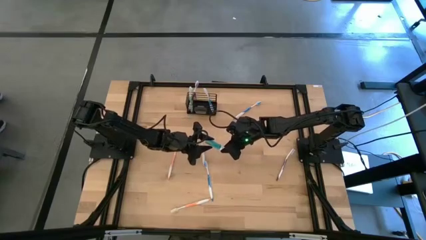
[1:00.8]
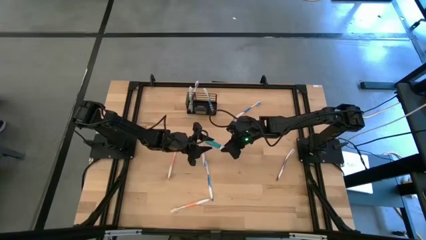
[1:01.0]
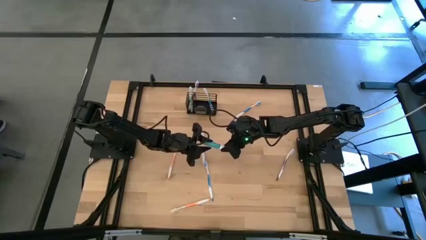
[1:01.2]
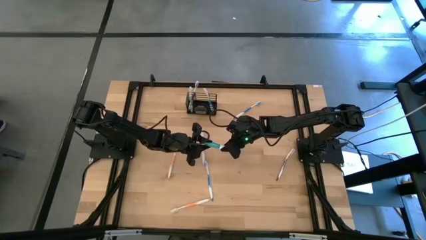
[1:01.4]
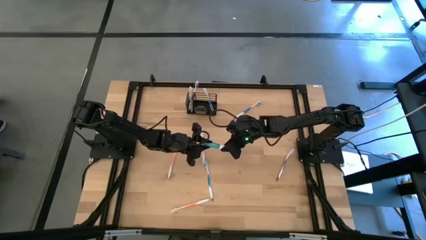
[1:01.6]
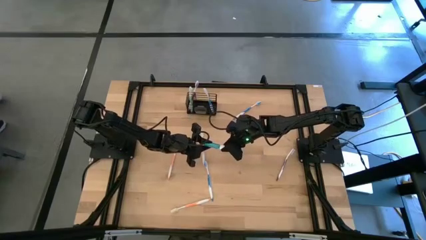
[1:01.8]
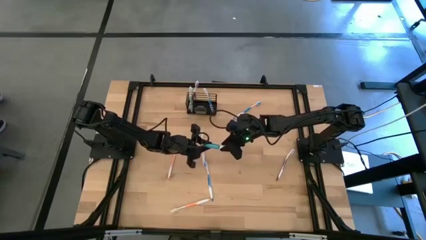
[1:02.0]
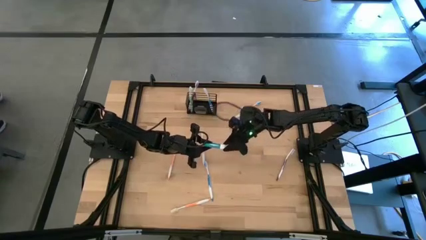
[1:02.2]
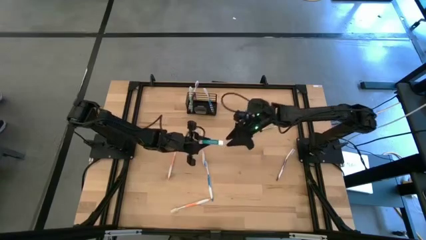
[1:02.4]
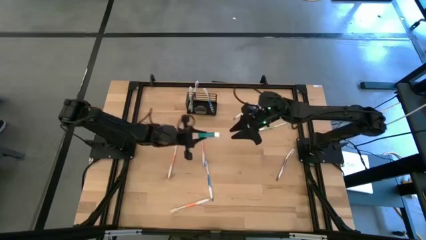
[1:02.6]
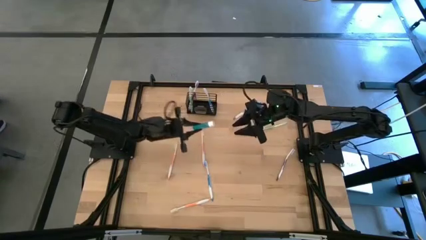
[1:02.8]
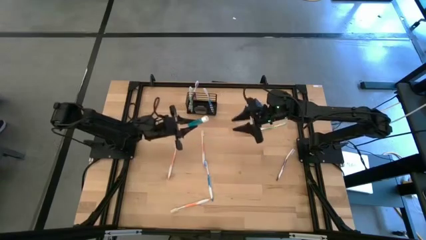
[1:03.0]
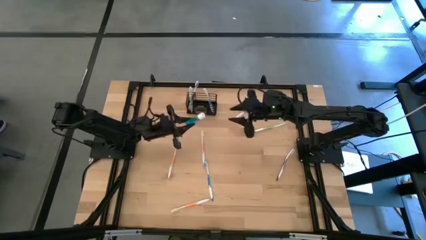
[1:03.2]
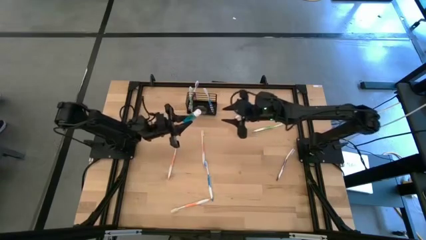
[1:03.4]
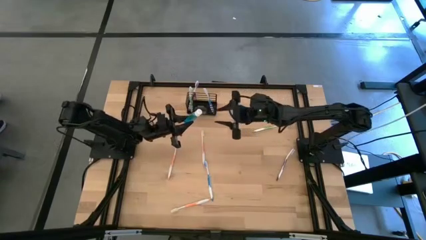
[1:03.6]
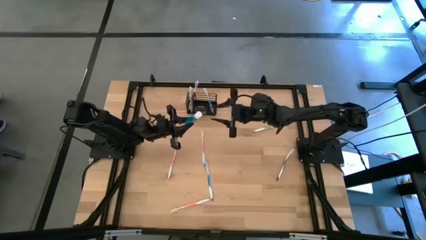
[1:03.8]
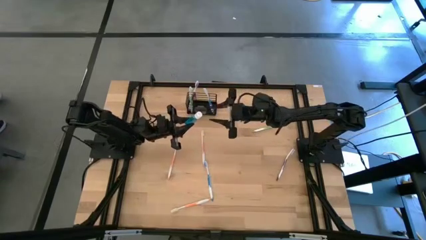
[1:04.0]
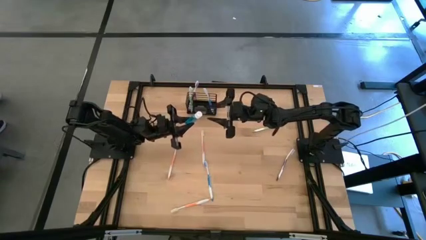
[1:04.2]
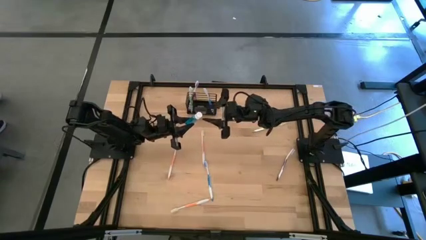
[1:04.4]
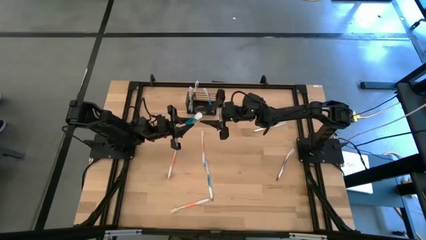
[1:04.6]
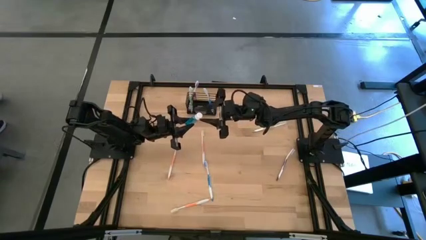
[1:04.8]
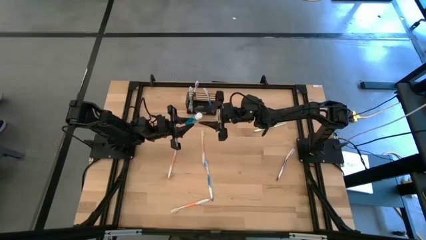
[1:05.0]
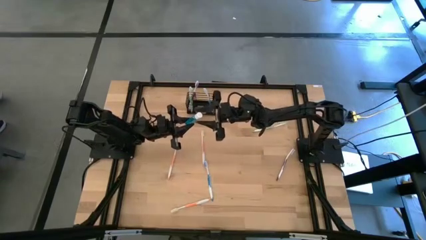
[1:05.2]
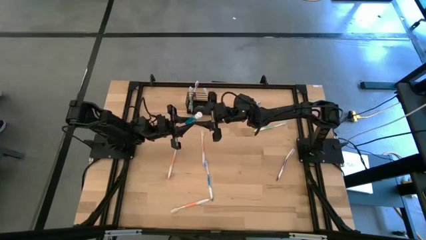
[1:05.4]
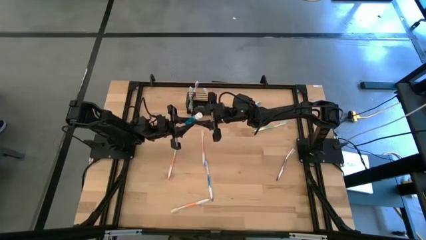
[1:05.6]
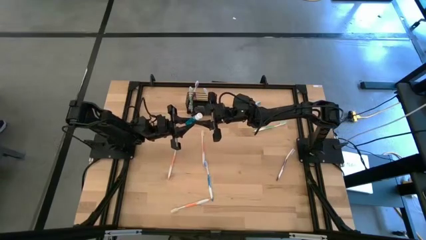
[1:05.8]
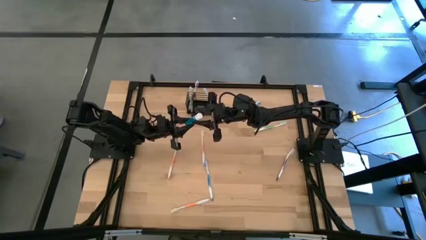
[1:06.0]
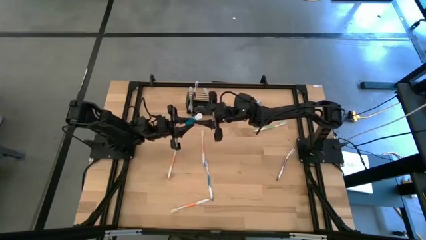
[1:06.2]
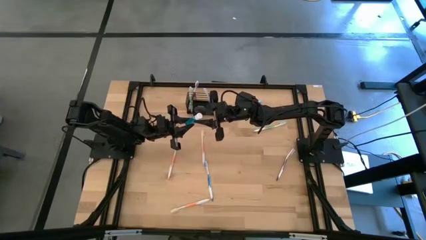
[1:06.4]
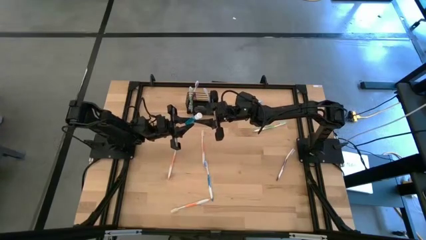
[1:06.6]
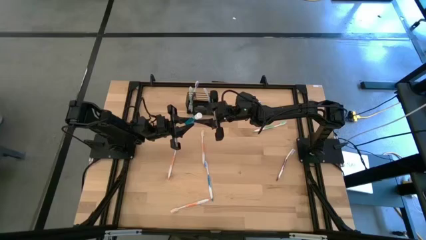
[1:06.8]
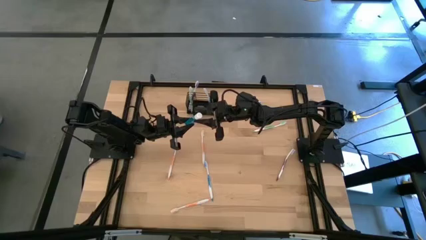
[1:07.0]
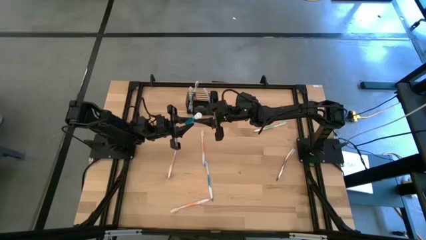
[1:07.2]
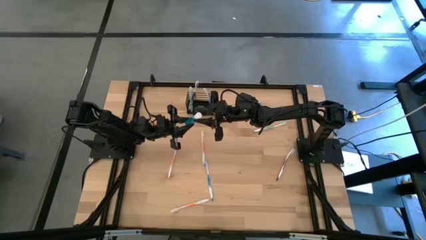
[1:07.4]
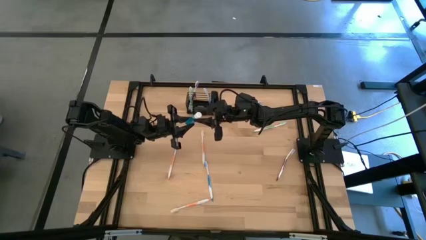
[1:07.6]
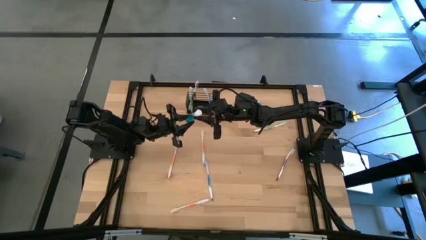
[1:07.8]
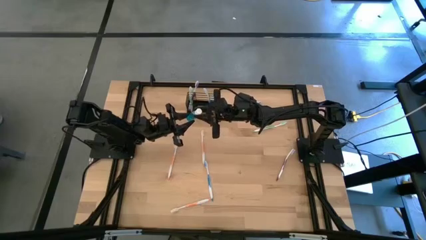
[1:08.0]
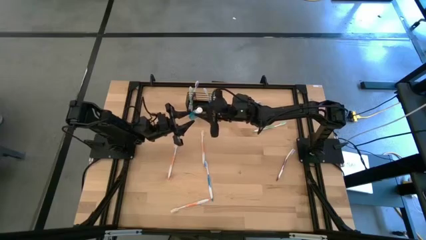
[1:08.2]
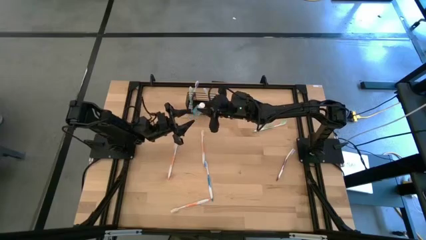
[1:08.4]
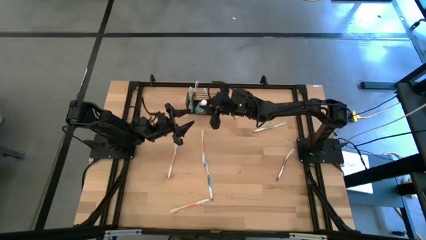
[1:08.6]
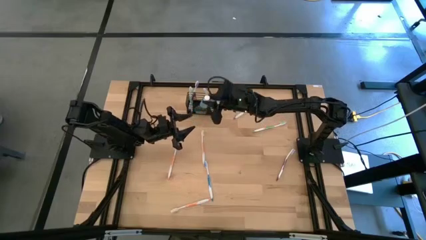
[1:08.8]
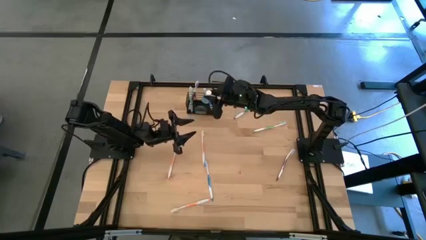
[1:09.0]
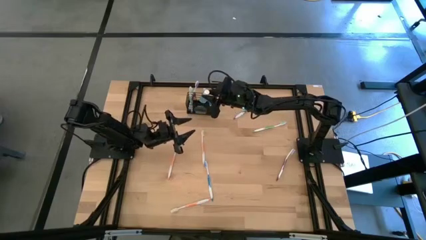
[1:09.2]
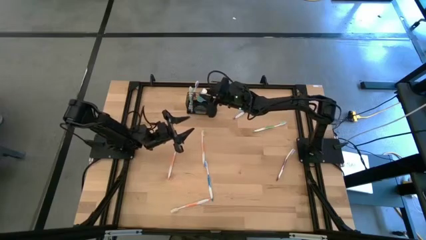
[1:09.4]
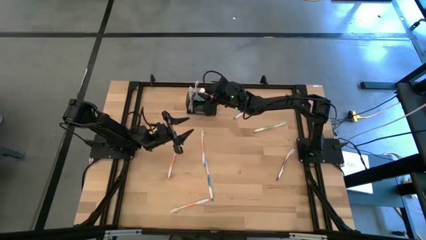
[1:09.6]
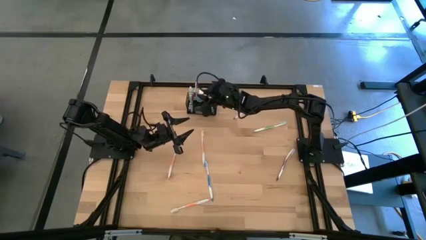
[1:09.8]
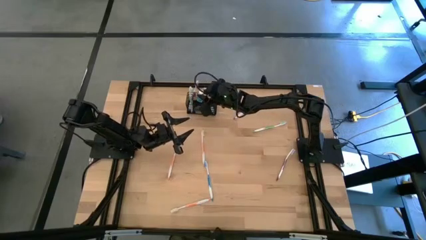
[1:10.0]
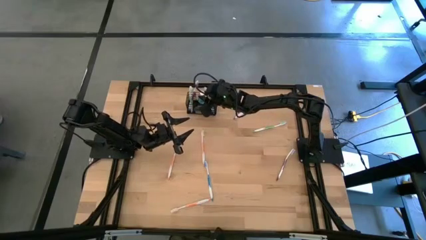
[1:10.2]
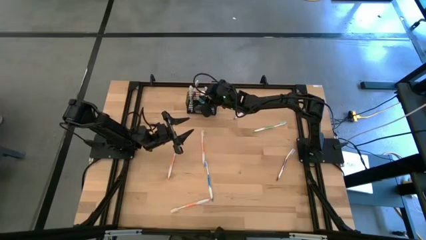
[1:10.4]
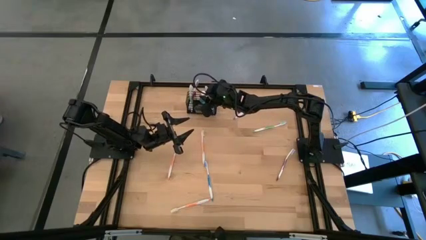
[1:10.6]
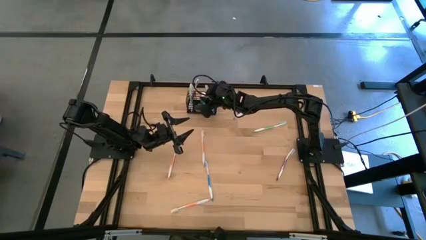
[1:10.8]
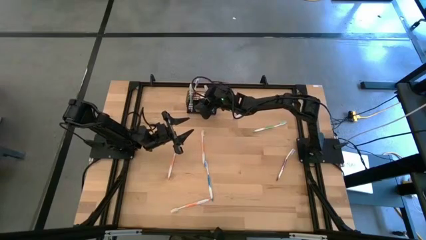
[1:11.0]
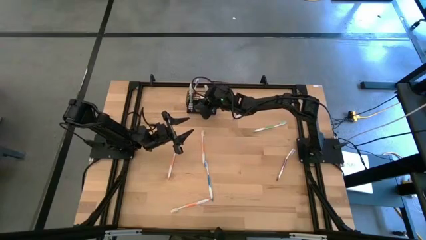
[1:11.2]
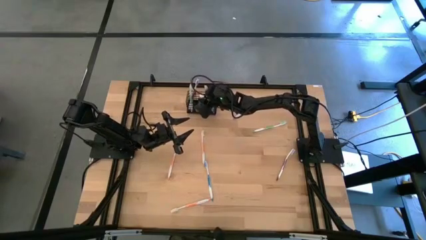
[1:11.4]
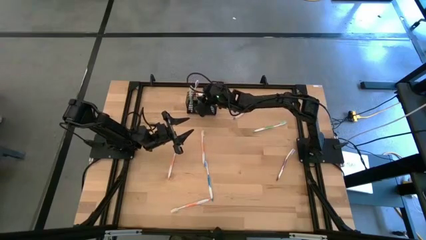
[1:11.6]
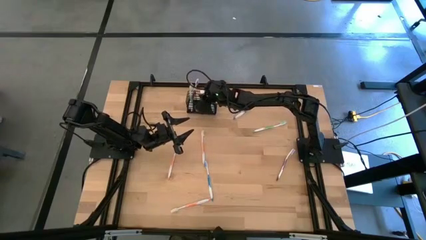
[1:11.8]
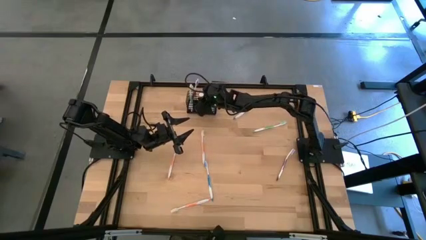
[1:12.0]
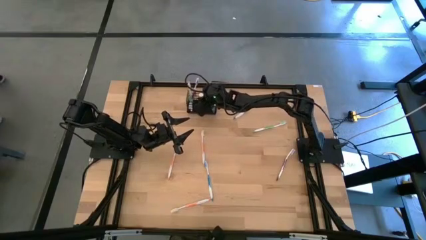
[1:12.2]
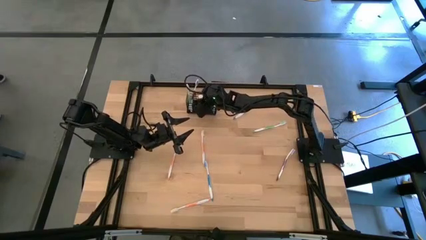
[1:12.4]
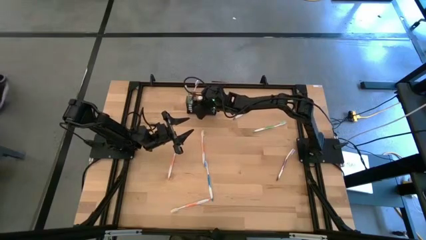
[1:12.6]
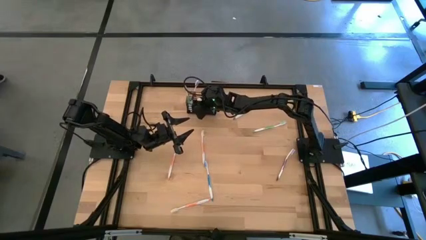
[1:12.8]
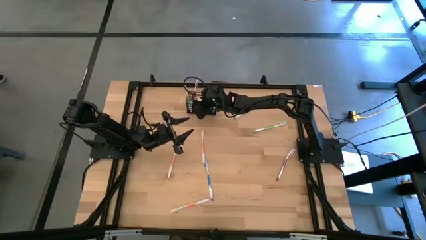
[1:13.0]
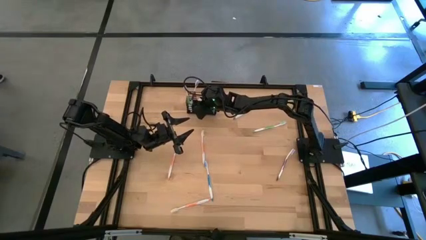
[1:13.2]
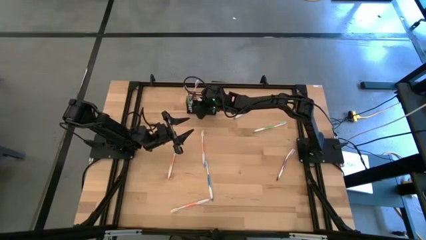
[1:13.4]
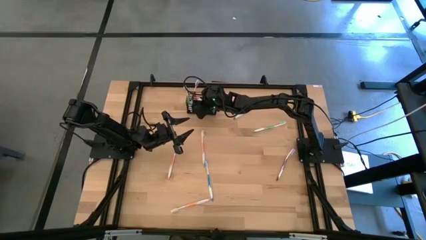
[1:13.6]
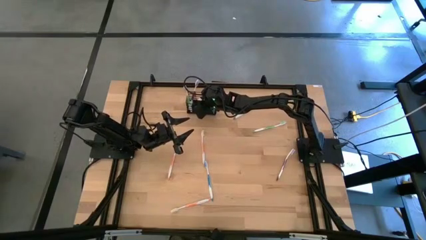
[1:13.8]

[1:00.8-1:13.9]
Task: Pick & Place toothbrushing station
Put the blue mouthwash bottle into the black wire organizer
